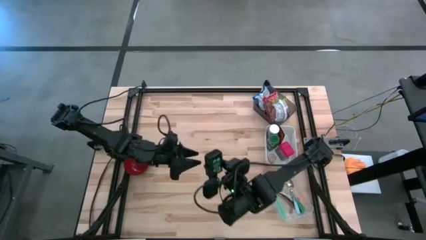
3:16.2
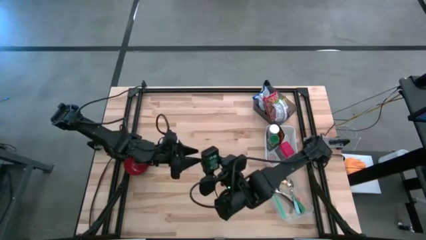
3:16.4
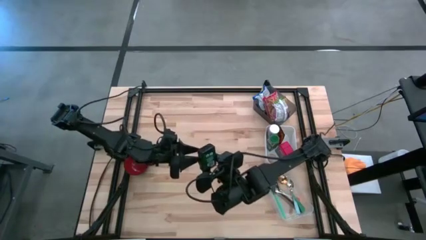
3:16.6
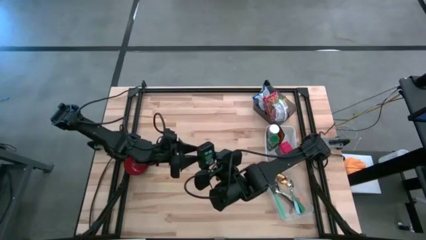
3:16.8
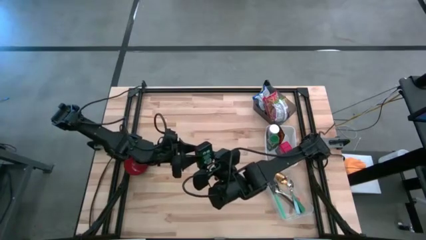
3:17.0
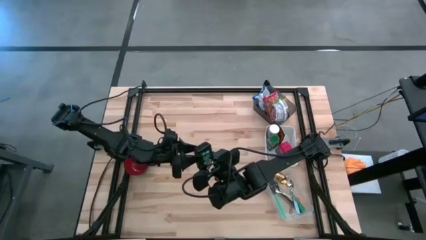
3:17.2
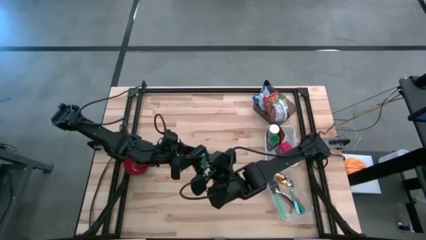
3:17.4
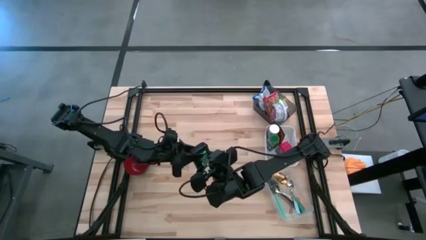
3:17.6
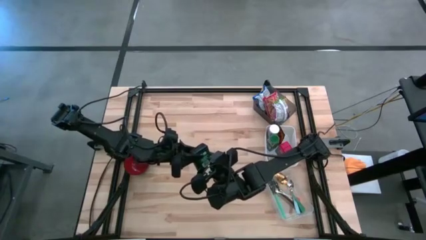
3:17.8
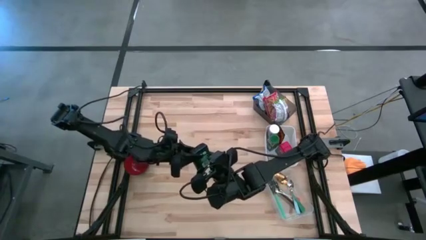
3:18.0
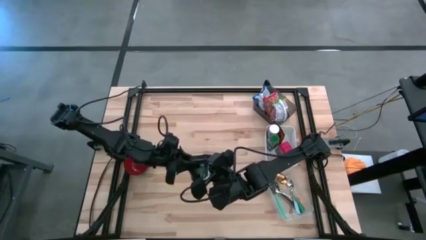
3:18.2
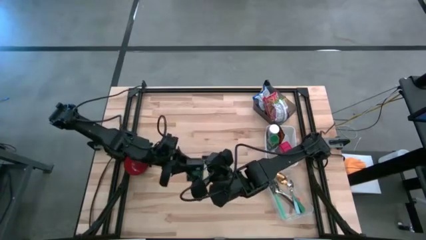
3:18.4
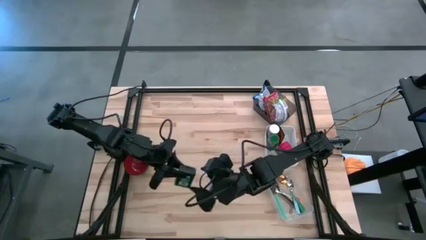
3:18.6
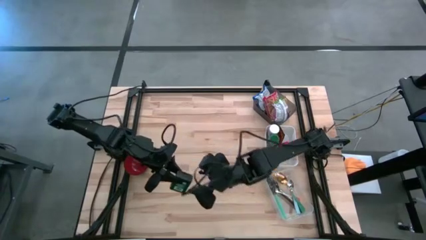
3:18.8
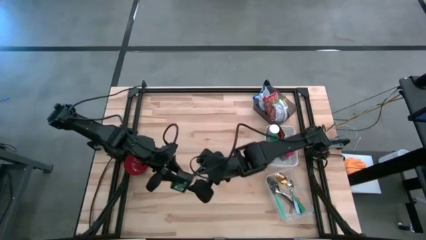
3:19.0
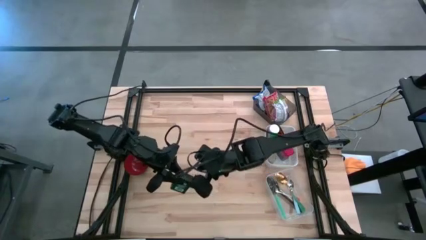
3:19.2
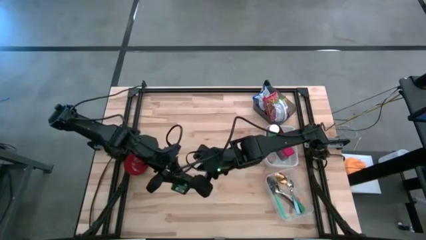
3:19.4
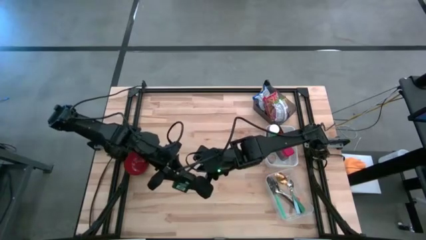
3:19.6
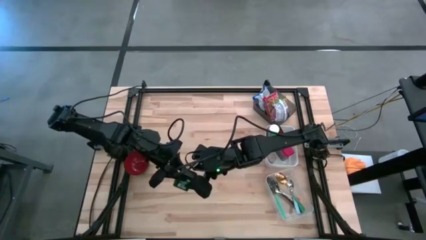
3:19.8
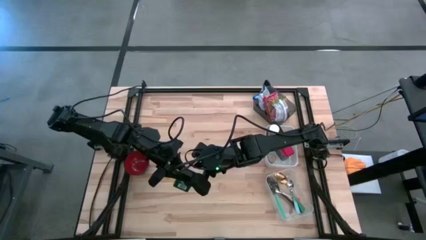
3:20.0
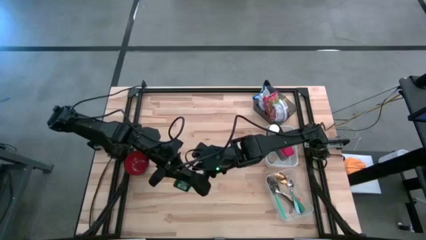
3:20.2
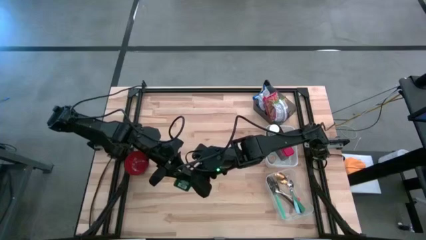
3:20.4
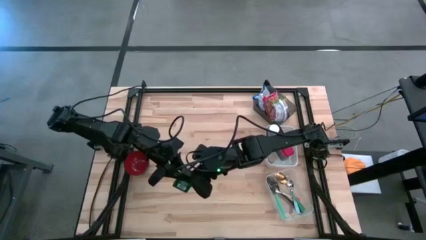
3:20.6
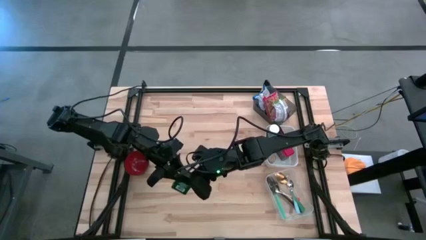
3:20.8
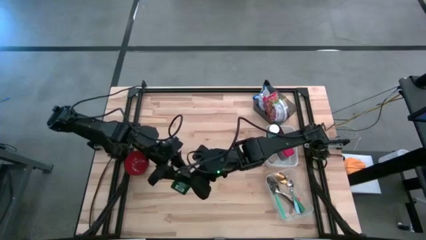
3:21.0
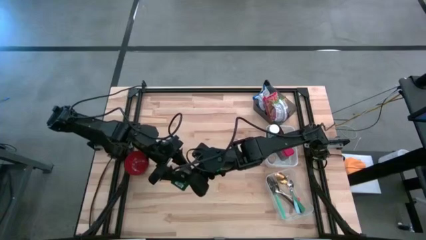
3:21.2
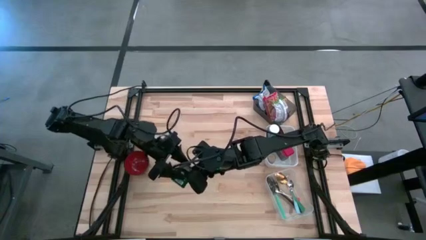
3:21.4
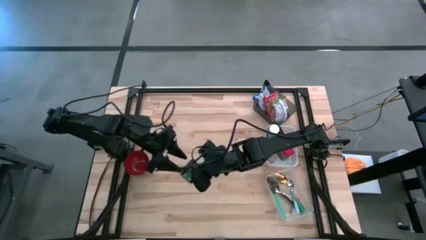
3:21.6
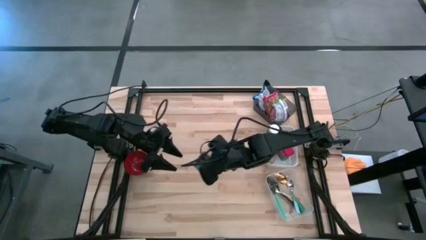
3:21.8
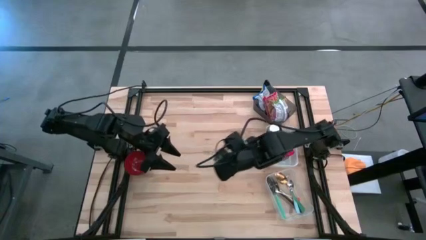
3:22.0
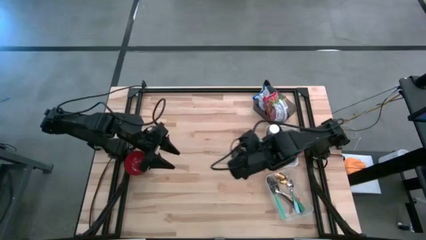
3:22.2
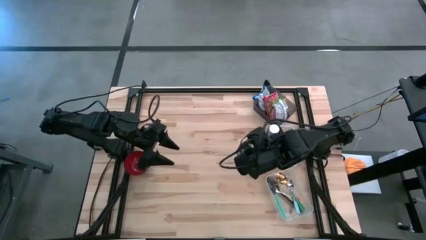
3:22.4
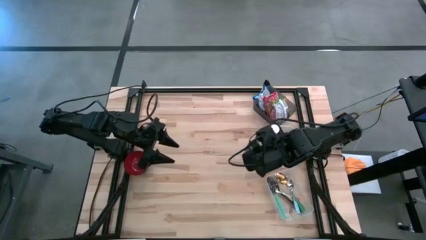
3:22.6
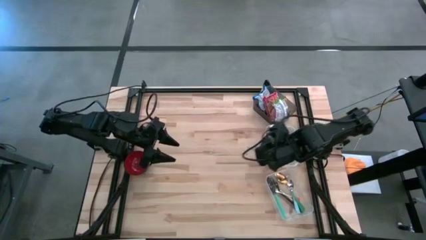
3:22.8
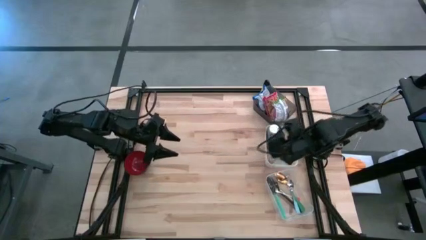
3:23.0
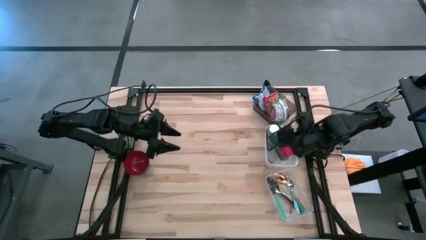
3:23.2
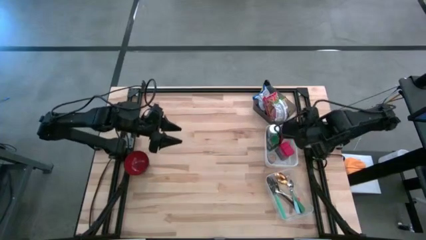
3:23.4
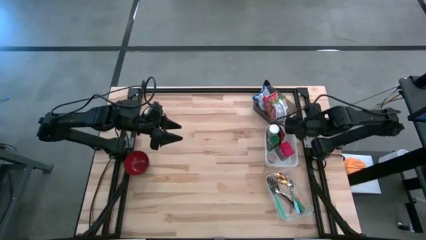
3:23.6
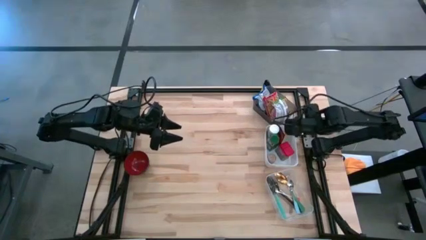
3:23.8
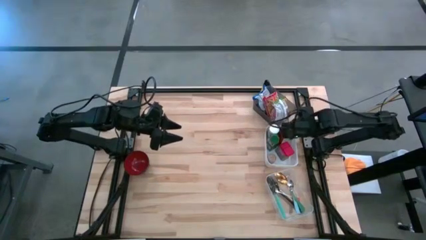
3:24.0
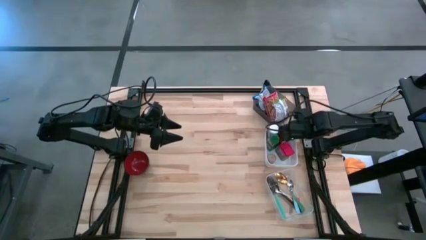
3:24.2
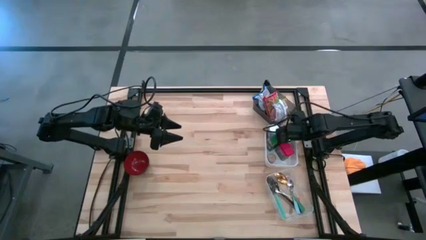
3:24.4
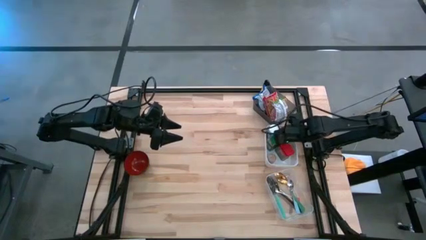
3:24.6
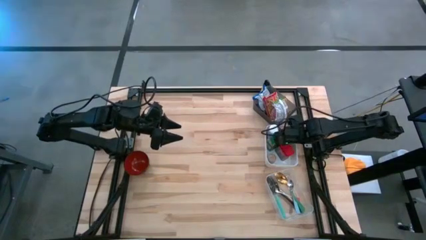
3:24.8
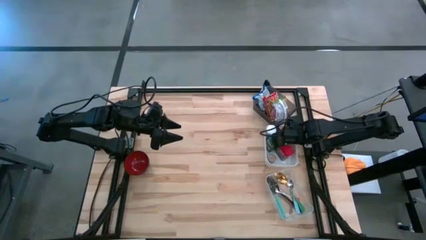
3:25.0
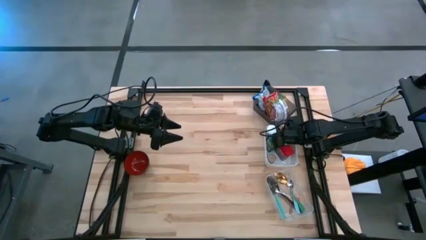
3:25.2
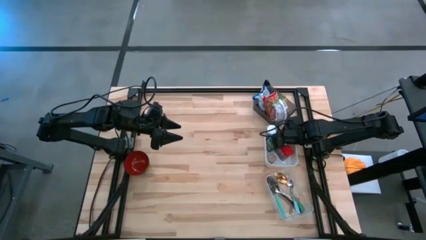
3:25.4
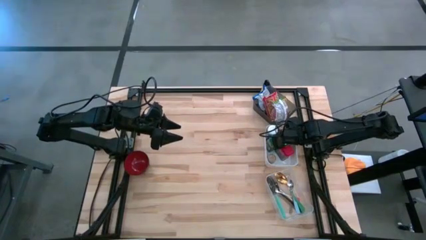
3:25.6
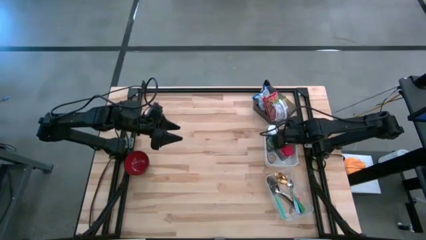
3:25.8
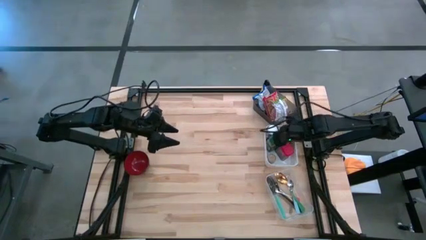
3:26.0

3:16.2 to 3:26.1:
Put the green seasoning can into the white bin

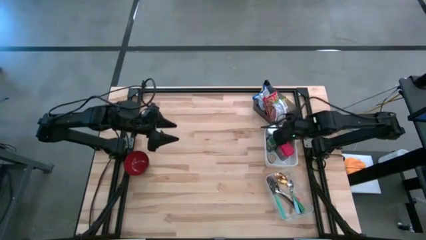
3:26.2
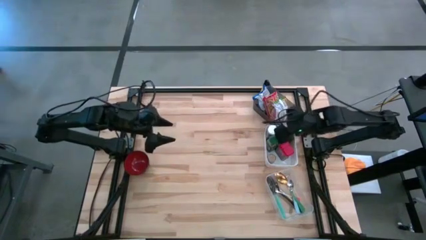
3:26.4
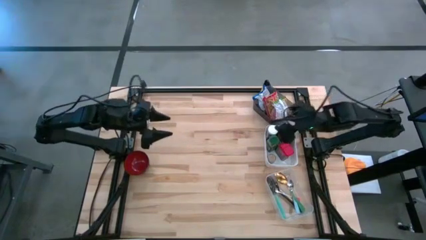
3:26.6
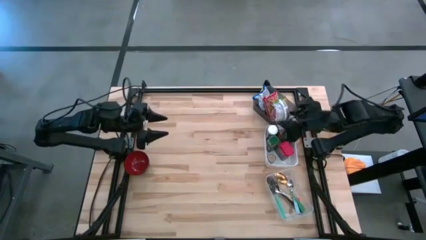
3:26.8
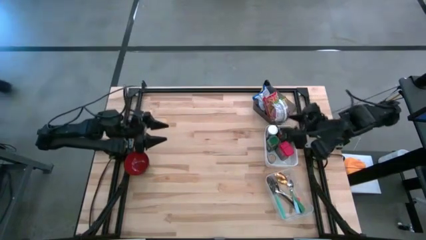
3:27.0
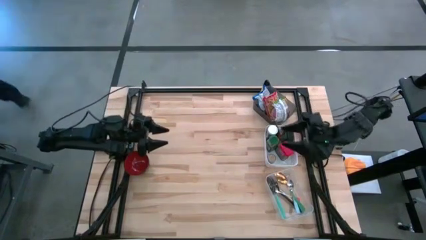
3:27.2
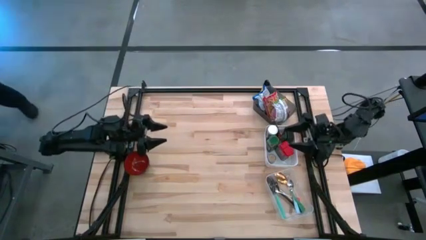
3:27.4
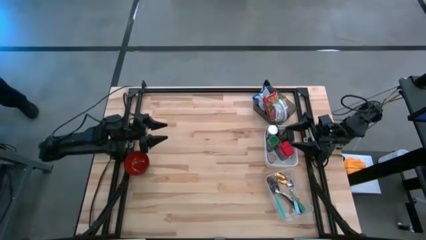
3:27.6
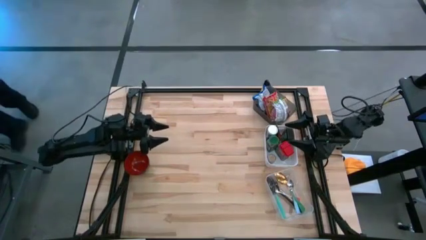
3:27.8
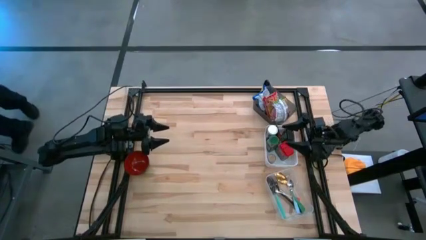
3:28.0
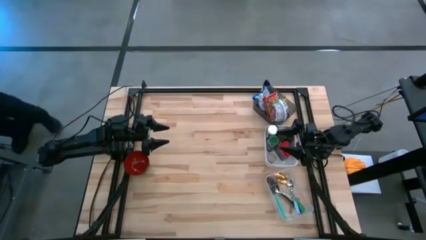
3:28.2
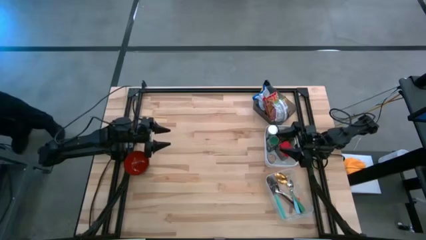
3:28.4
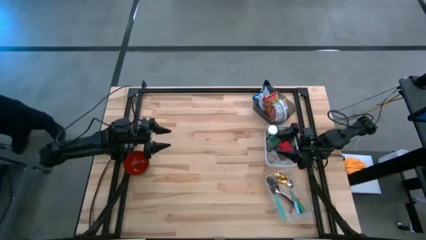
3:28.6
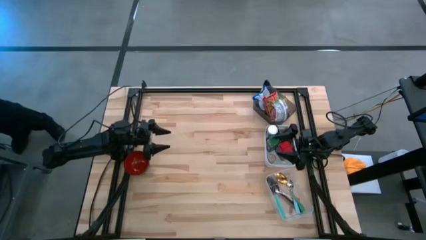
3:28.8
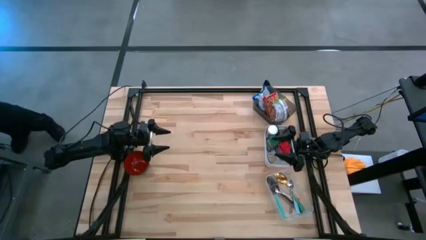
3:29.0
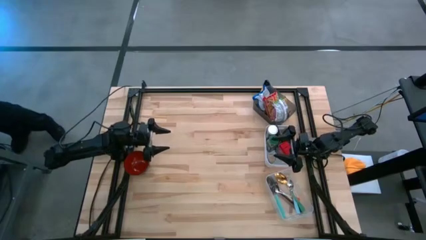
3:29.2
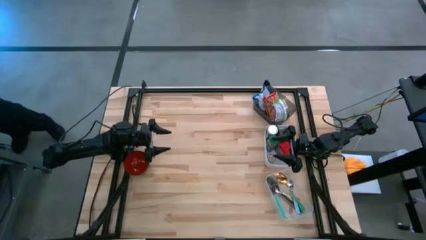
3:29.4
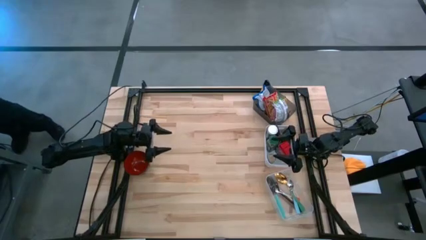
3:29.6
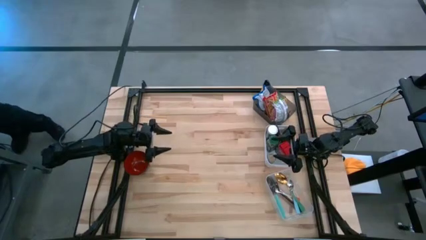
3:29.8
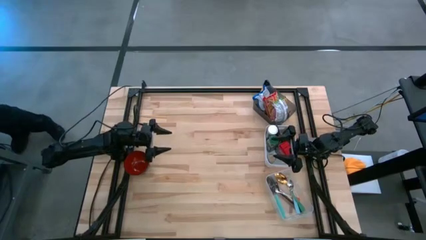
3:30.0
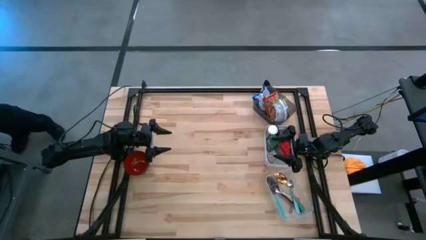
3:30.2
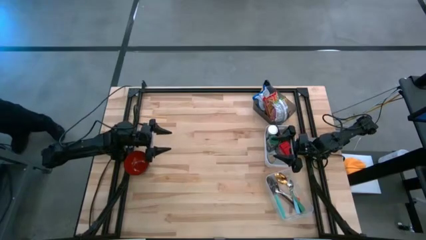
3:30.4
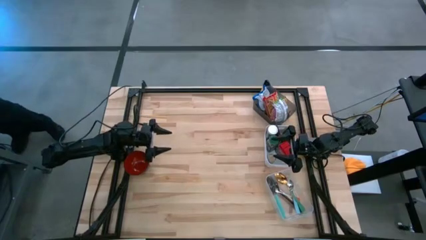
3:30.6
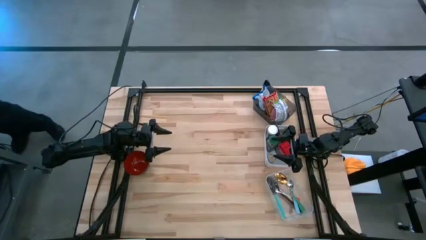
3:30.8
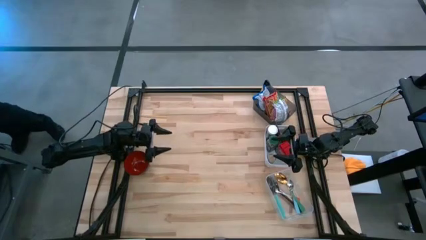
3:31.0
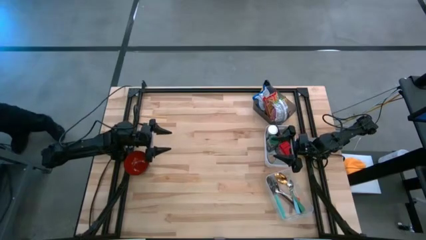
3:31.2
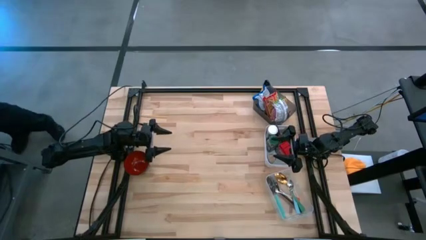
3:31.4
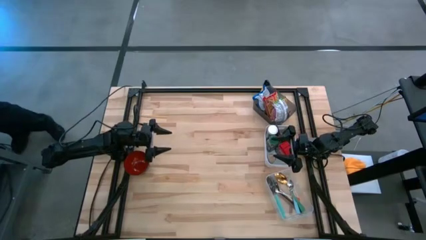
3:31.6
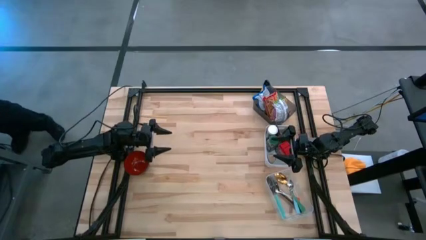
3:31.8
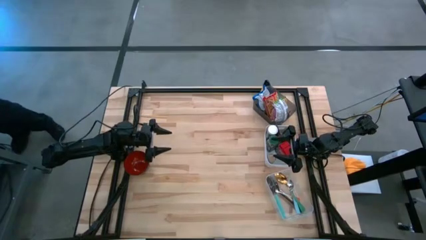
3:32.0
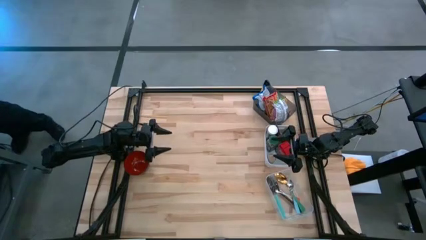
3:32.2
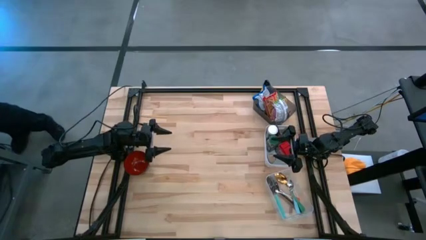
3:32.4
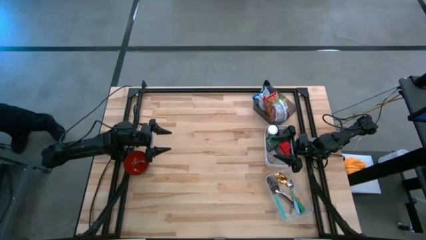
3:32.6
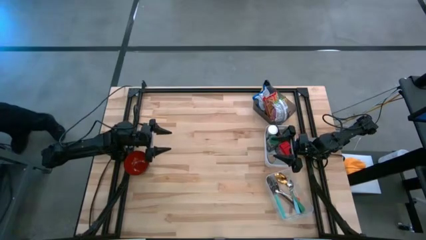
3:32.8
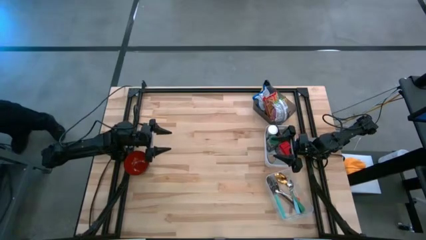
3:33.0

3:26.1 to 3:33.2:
Return to Home Position
